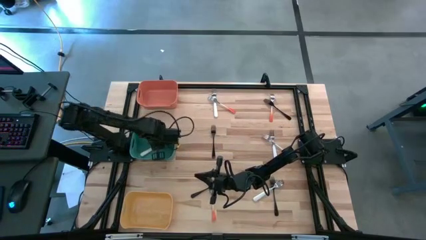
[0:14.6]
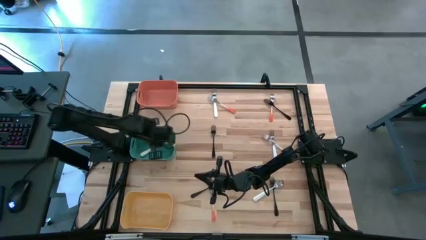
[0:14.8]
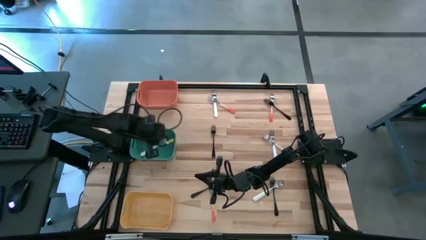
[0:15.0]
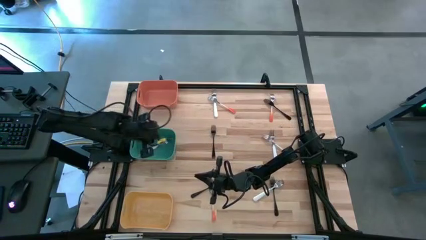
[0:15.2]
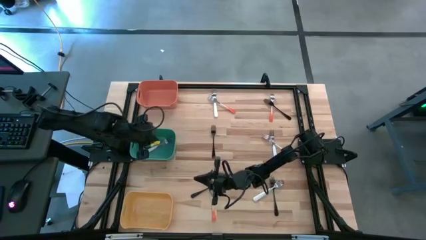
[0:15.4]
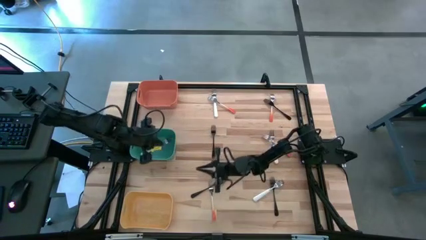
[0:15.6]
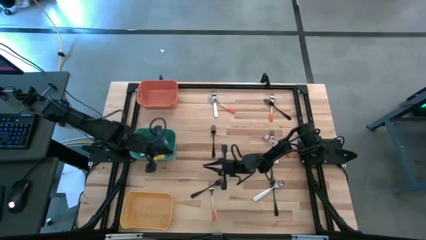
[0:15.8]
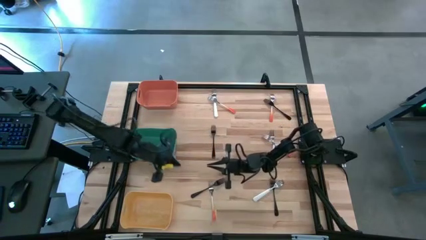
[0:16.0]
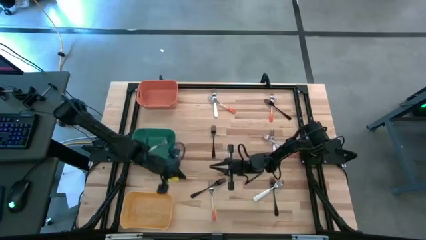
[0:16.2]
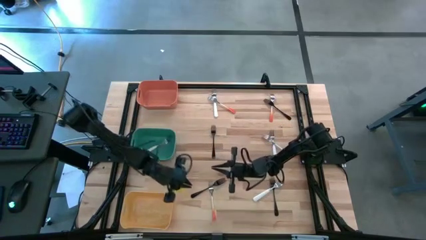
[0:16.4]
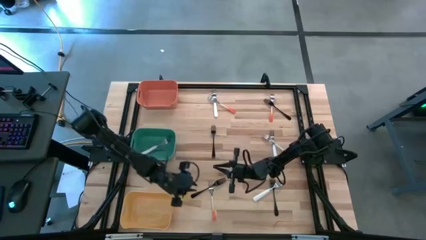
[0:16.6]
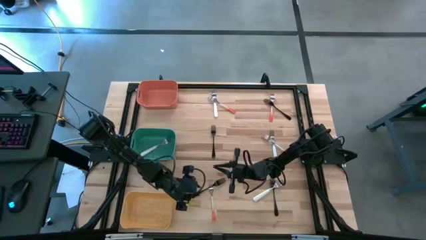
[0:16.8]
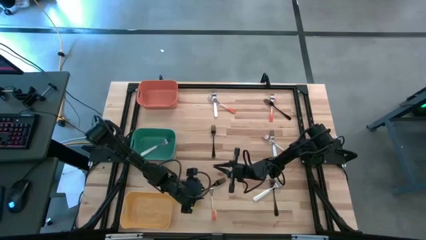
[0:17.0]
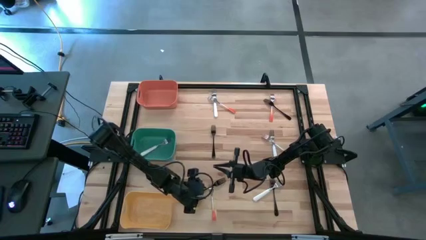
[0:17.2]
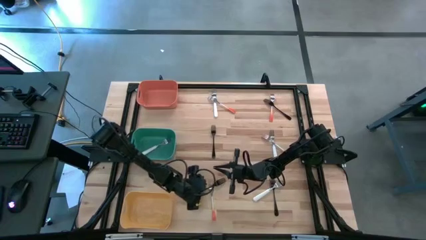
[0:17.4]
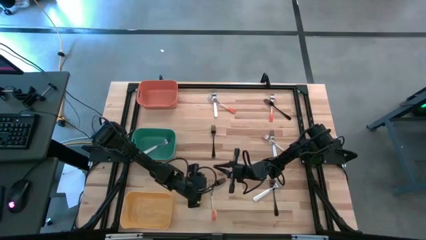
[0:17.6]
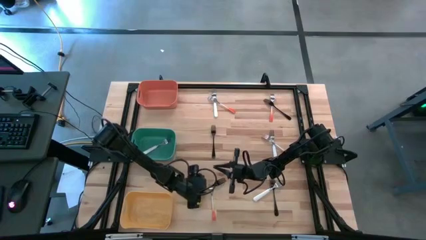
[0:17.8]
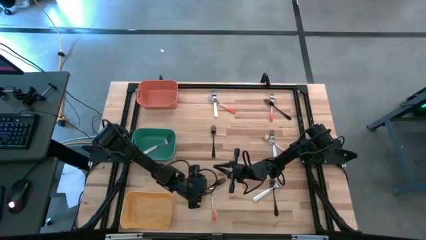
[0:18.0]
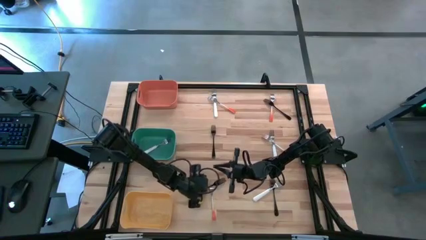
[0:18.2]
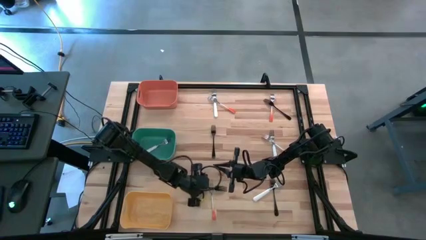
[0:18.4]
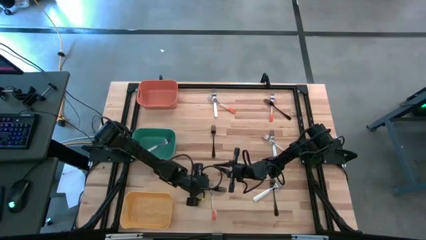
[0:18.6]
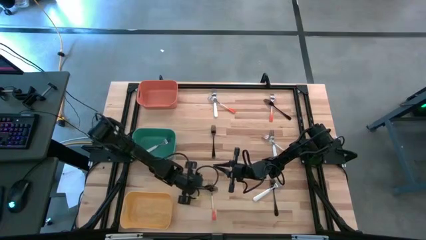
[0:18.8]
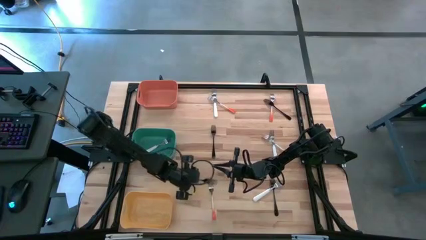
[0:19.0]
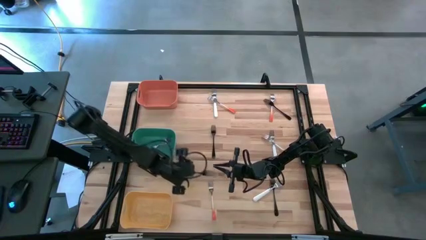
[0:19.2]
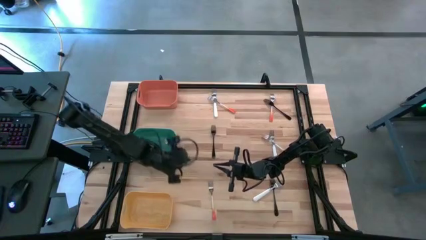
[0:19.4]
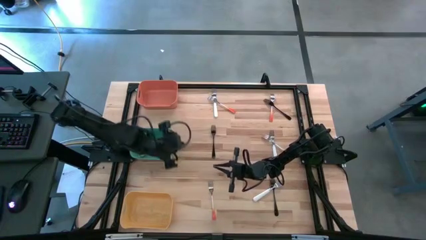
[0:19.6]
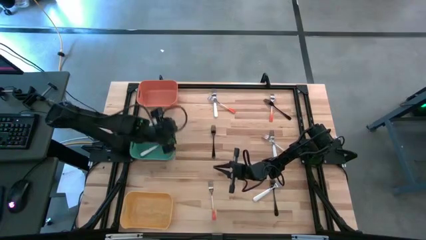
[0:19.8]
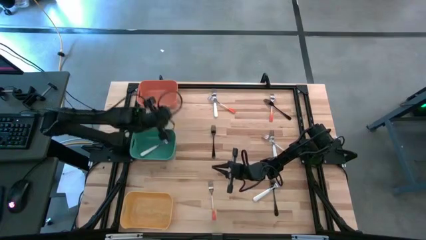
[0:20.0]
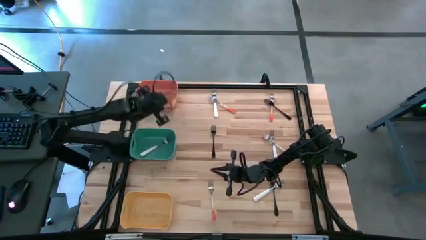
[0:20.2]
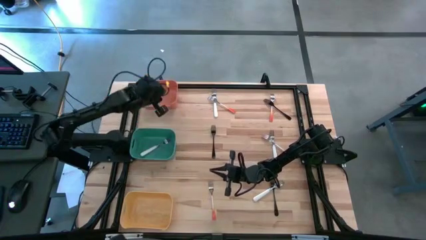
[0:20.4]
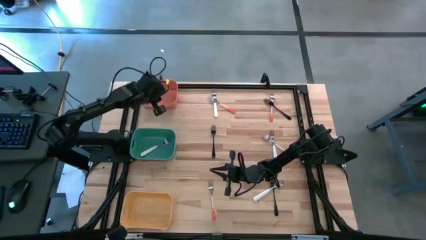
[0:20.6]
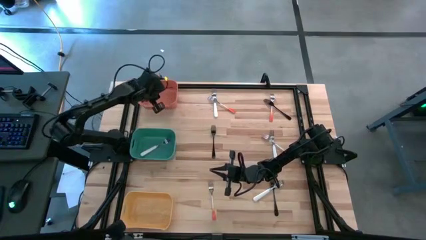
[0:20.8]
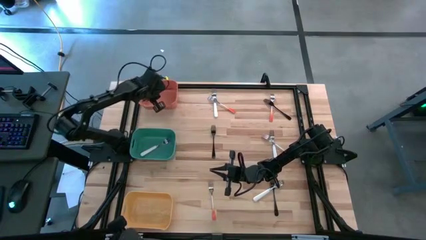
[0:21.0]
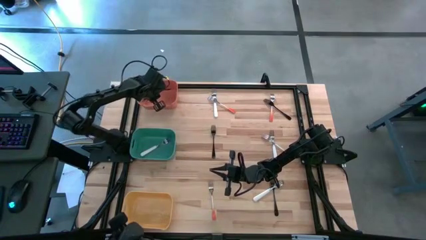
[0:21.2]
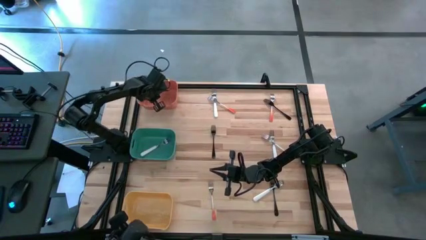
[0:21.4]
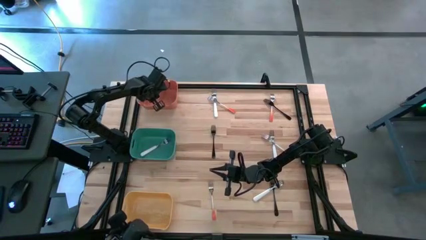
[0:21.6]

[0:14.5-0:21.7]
Task: Sort silverware by color (type)
Put the black fork into the orange bin

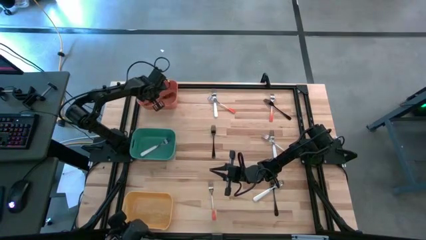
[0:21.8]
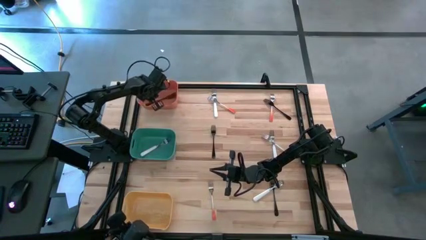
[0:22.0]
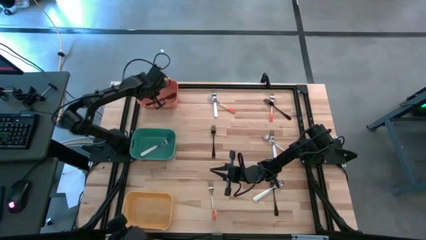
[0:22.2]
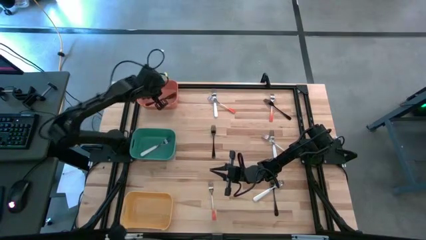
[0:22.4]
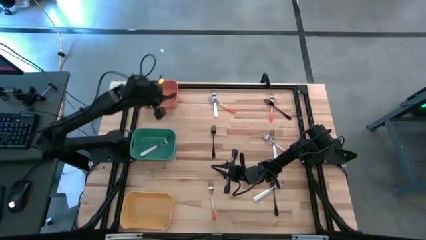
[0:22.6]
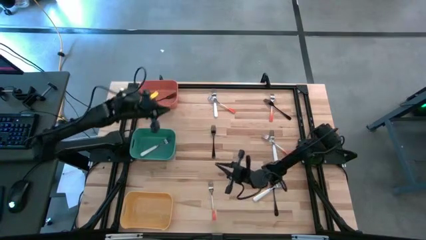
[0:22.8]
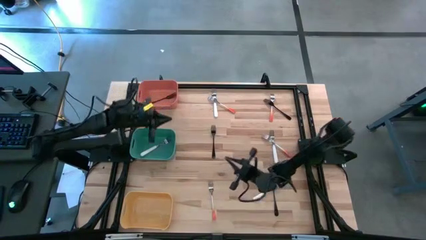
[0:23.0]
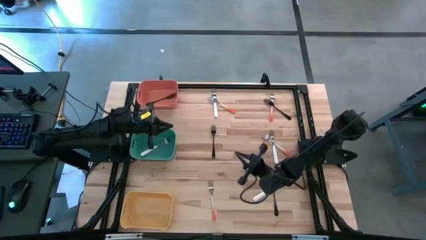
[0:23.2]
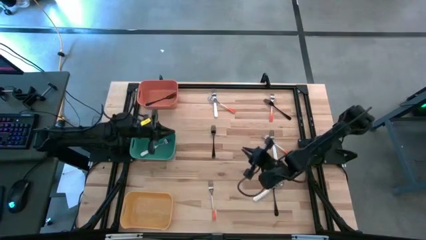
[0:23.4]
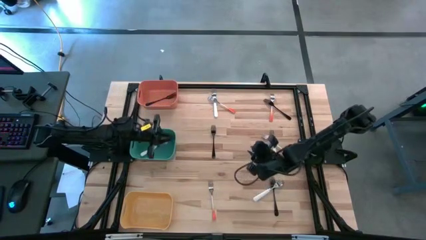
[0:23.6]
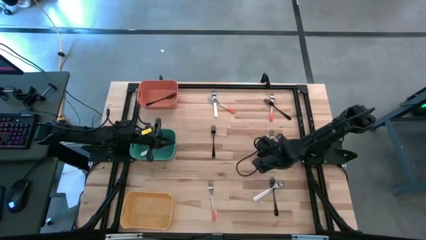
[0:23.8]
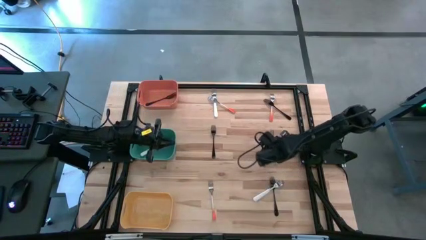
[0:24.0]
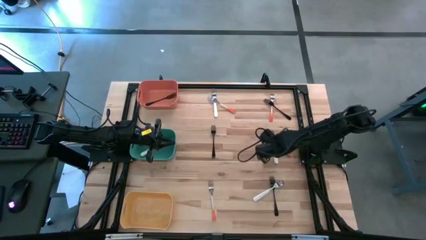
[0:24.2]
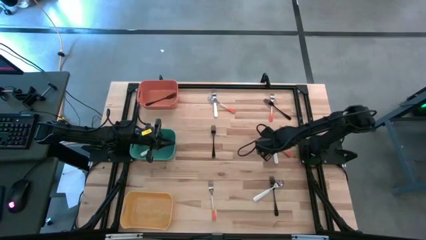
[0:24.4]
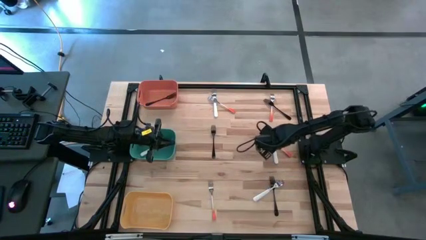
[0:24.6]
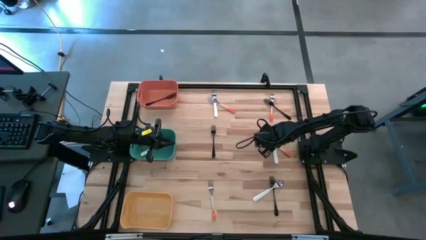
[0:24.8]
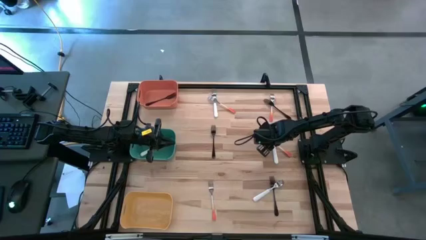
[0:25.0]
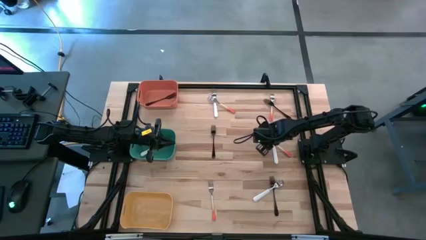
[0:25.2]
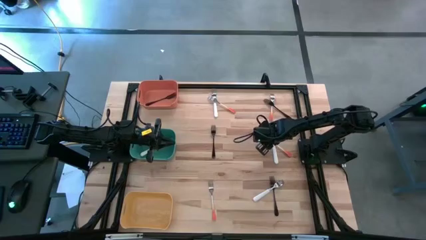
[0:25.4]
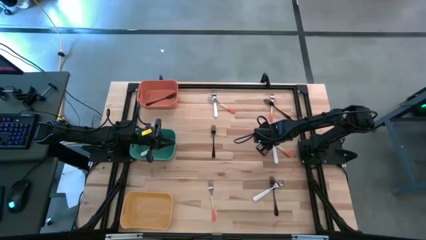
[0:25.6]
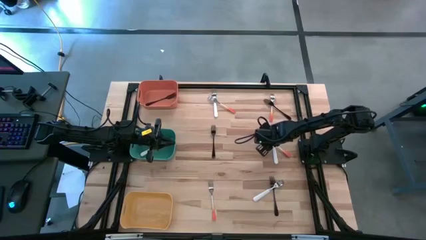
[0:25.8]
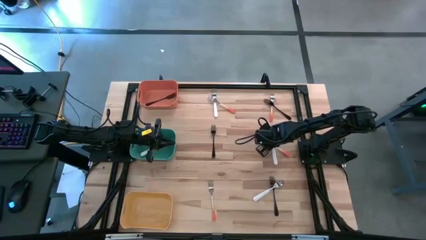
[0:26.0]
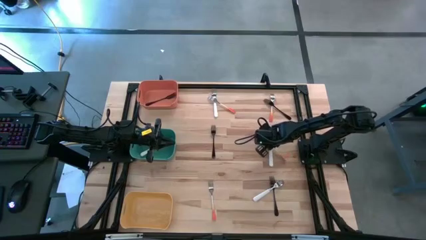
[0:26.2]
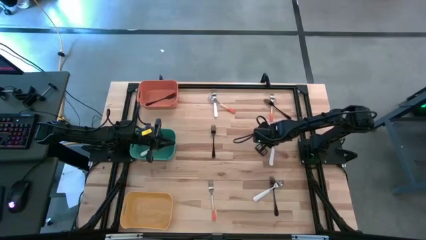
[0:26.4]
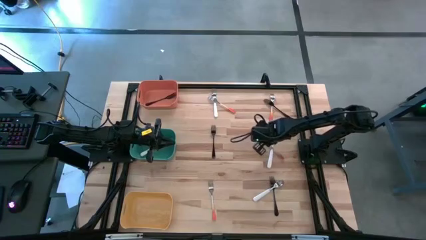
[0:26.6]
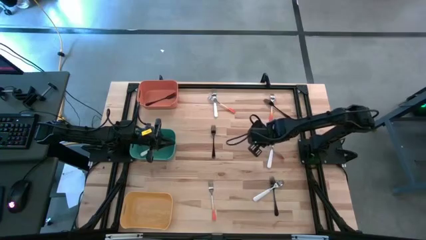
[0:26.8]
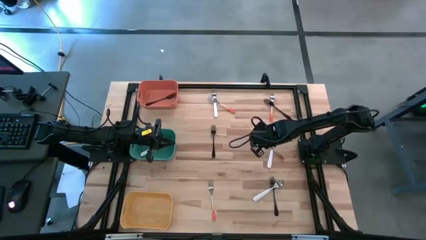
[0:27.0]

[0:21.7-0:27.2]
Put the orange fork into the yellow bin
